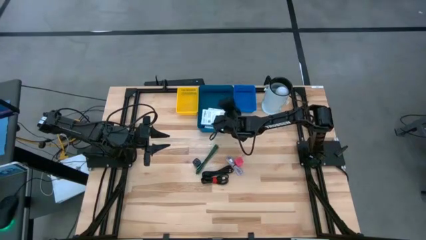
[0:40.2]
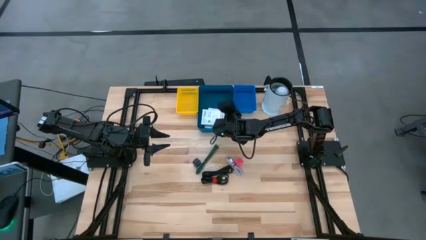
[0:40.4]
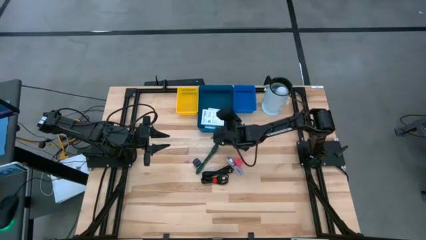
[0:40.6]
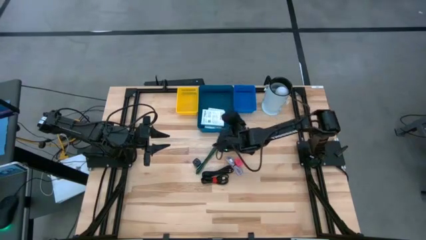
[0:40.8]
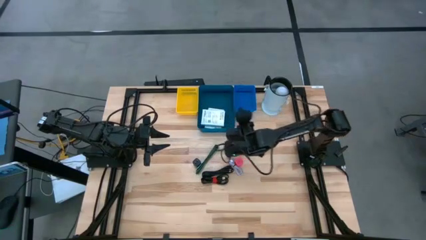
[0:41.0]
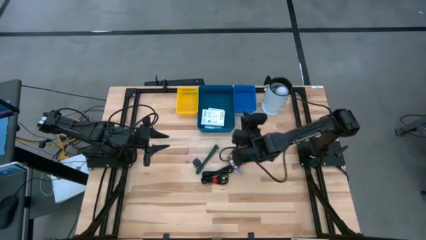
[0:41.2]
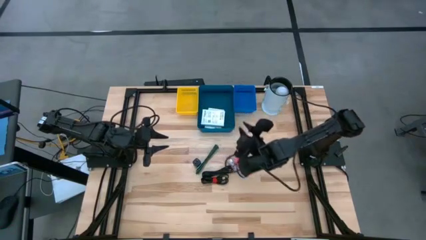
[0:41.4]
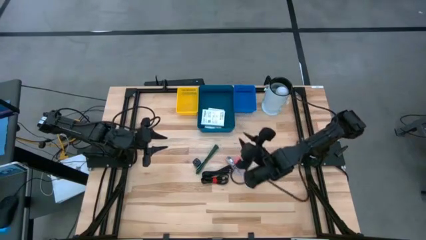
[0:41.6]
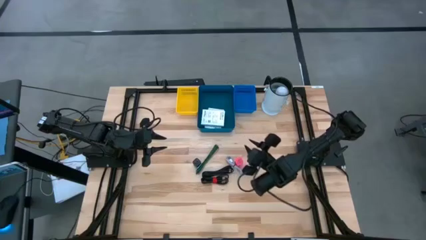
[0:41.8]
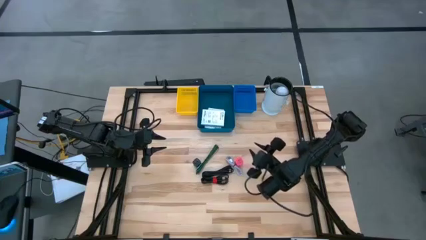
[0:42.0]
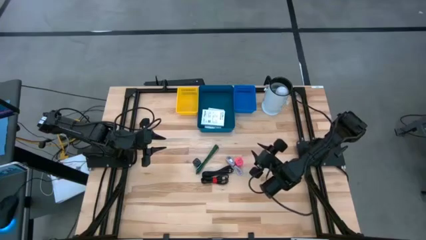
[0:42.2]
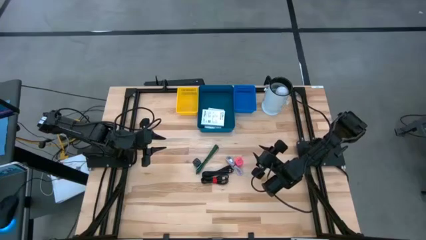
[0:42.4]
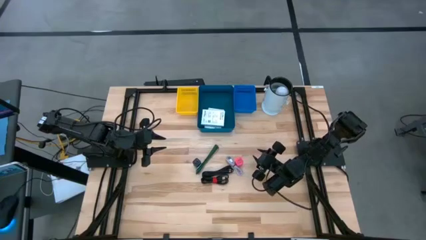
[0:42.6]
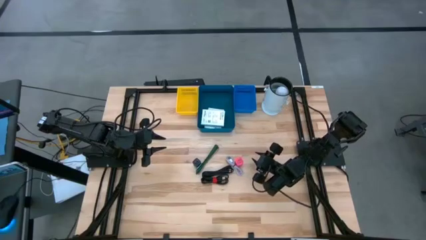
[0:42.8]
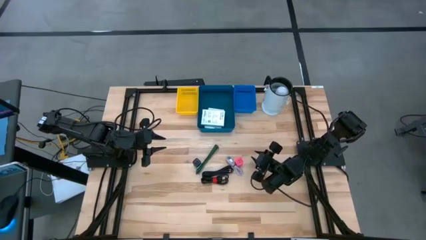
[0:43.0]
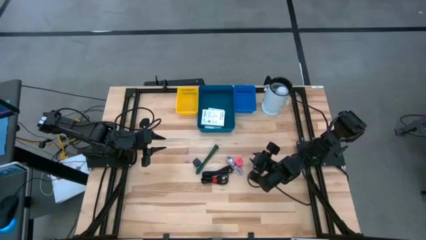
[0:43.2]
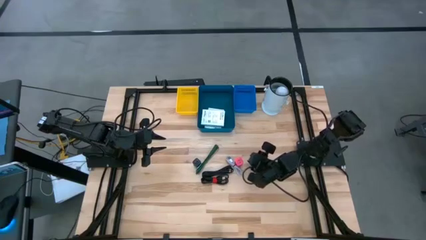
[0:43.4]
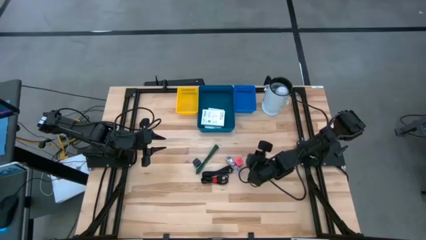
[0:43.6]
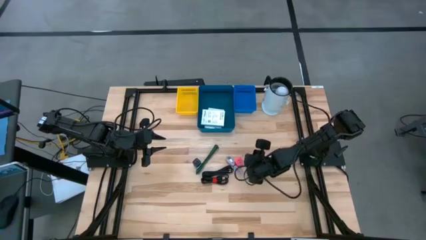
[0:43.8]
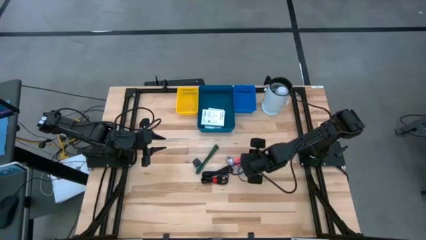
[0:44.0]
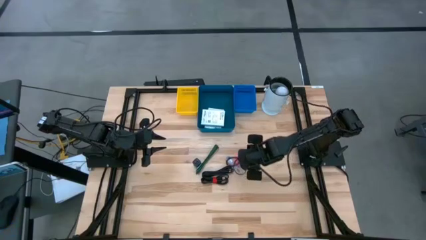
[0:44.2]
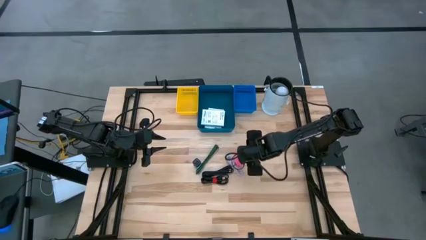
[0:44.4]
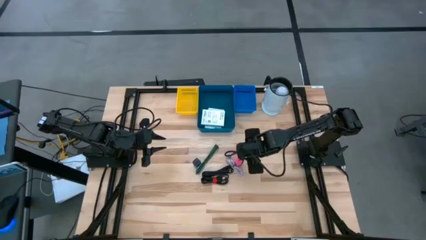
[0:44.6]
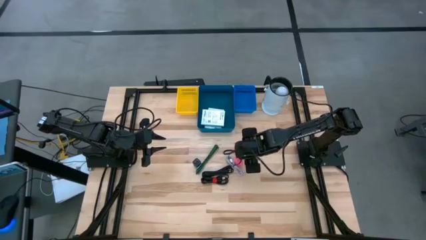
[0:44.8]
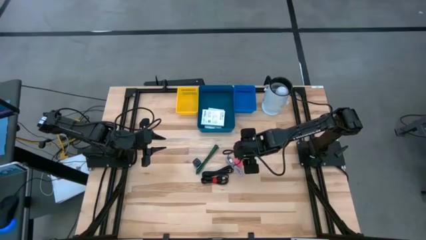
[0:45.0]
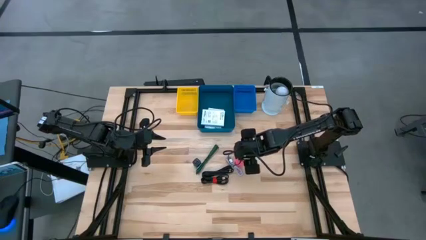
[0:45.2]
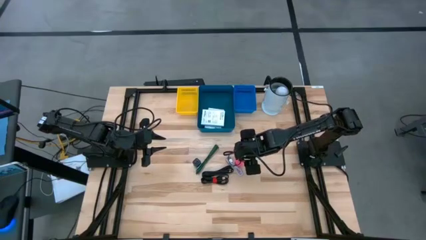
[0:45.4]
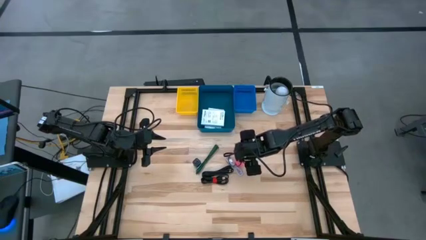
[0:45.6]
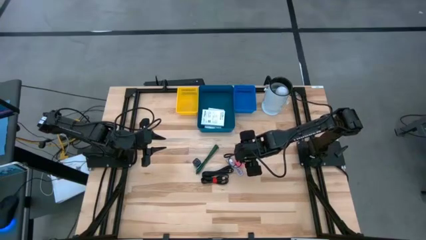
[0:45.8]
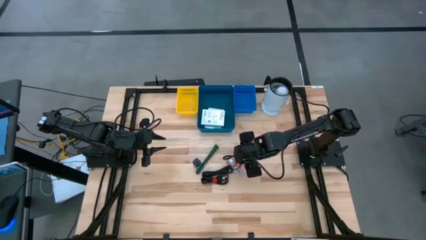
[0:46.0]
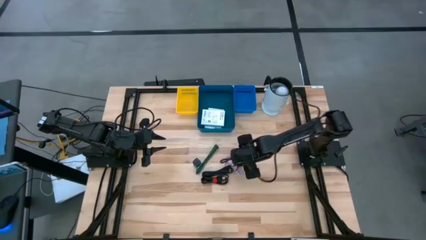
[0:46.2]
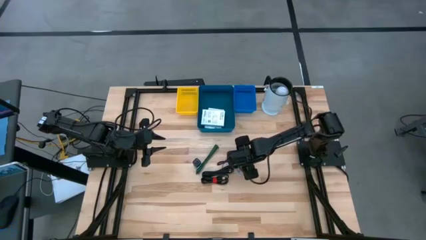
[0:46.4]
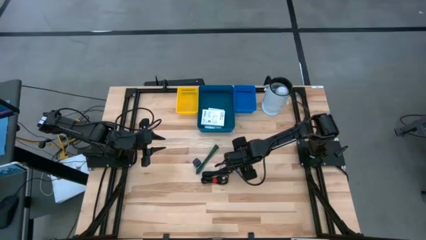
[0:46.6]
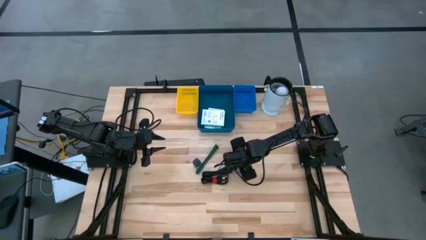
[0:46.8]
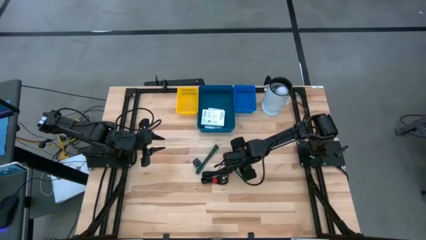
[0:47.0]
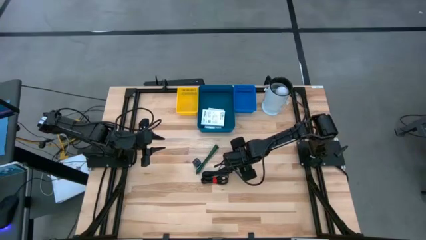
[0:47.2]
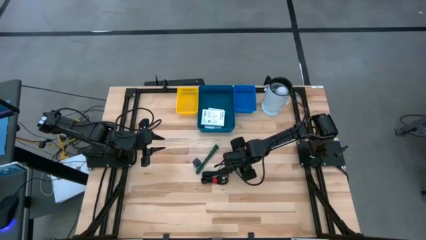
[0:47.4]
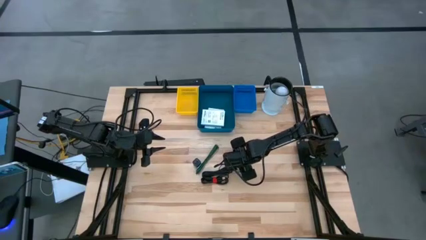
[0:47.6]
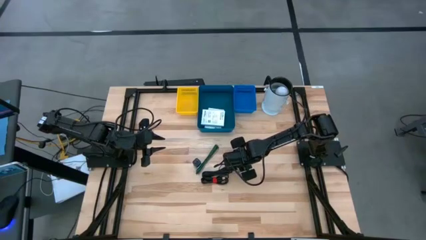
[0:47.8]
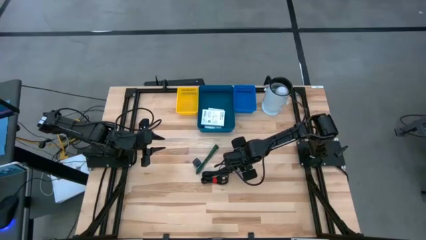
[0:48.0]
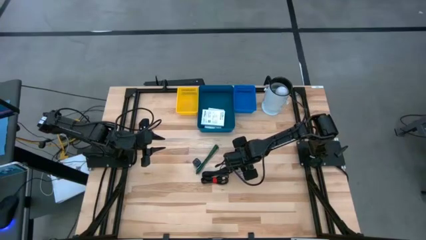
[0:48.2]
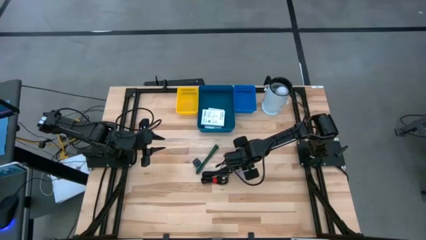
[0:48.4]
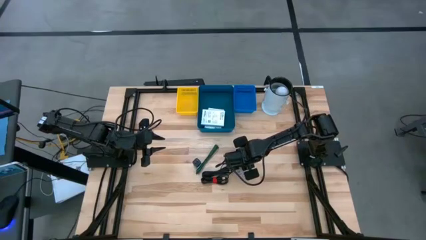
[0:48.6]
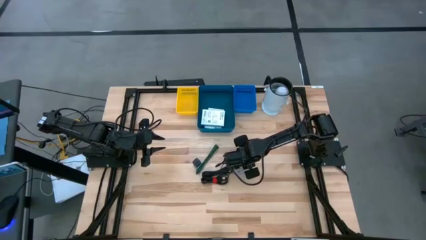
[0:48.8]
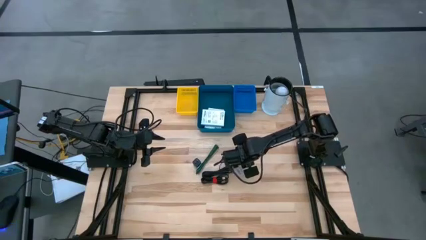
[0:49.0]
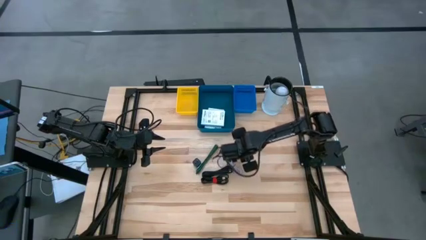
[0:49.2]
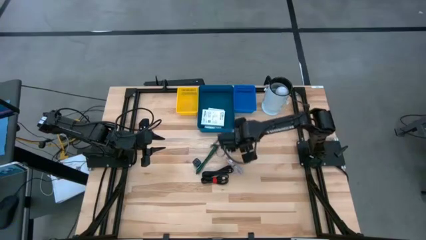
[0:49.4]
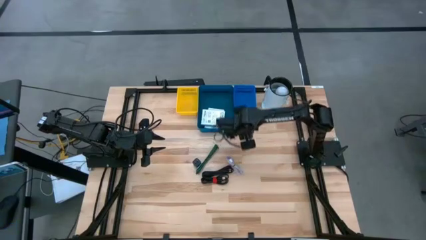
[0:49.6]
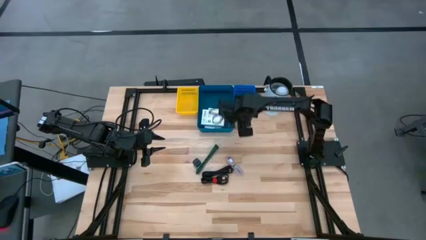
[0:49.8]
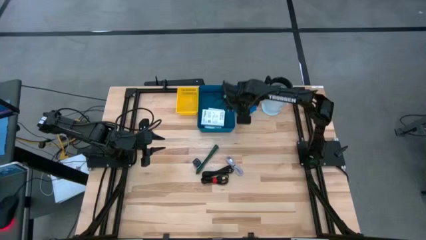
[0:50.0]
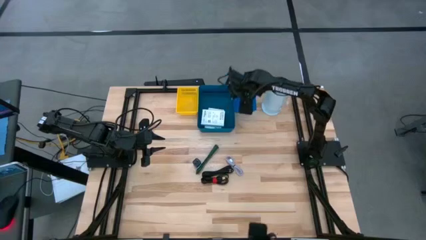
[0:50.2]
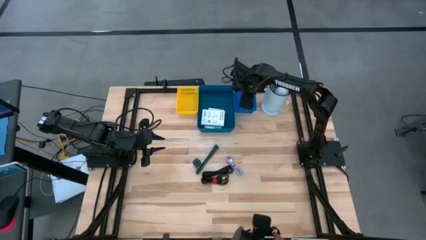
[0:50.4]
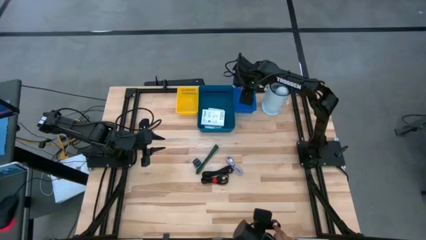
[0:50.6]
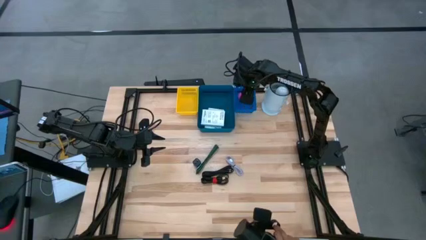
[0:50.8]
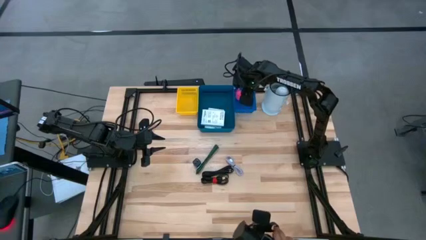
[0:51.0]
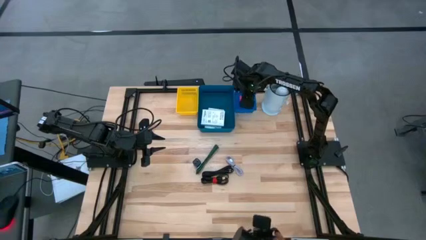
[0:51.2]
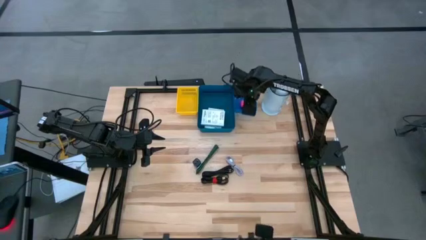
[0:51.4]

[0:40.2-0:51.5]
Task: Pick and place items into bin
Put the pink charger adapter into the blue bin
